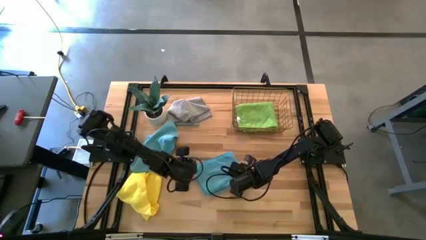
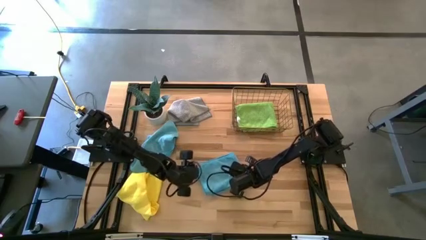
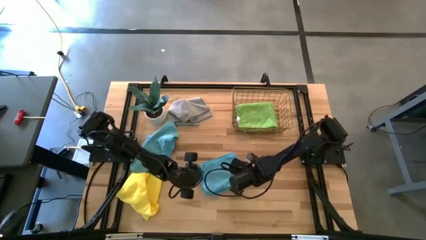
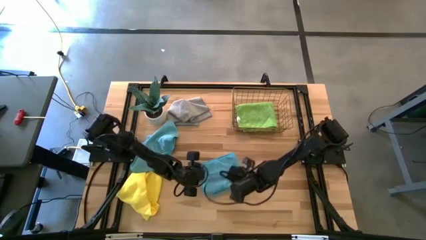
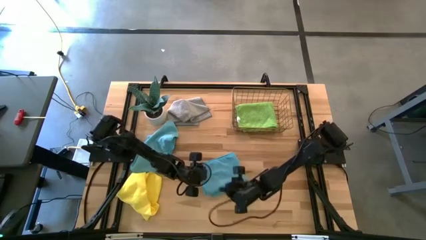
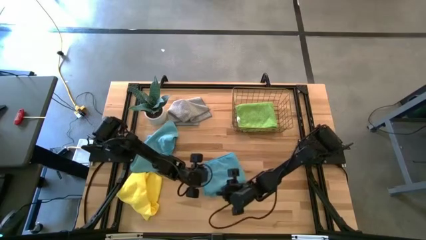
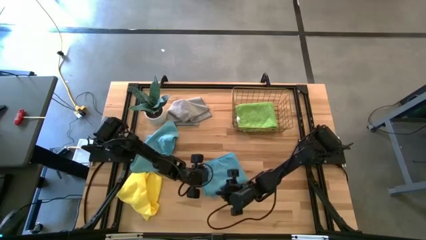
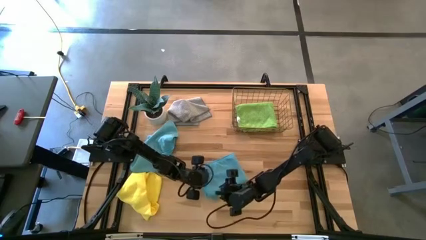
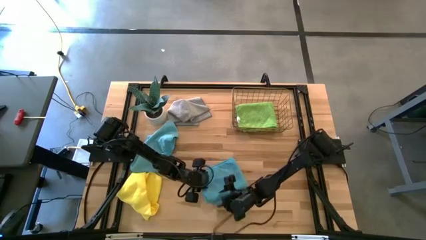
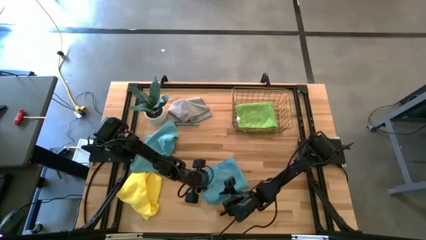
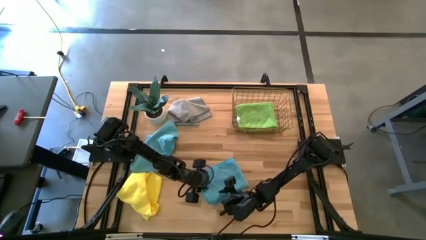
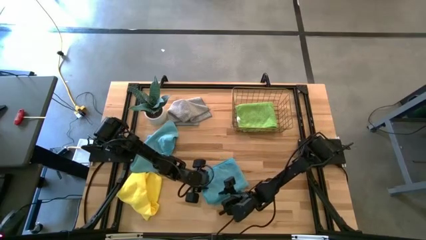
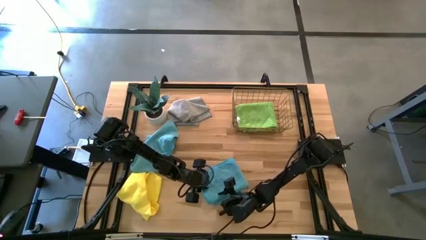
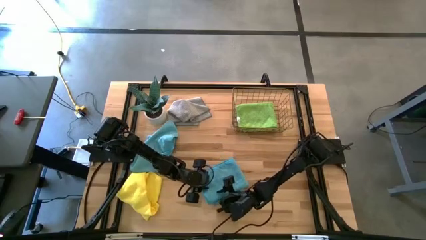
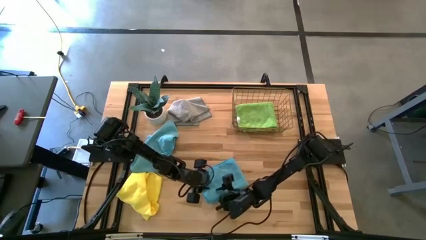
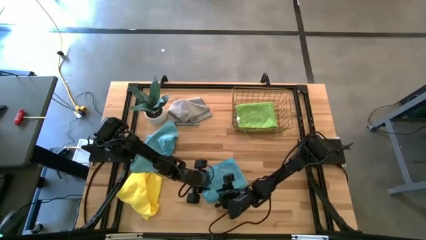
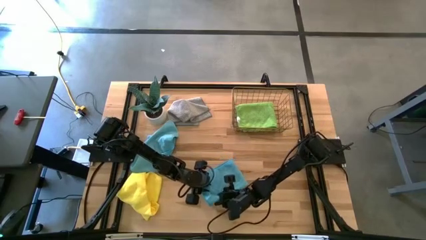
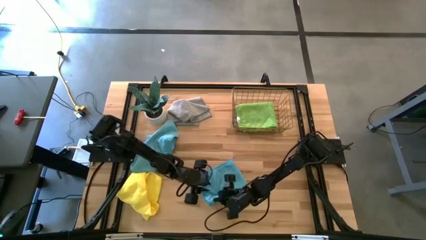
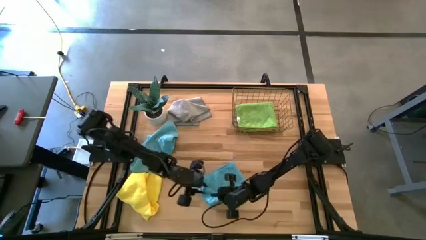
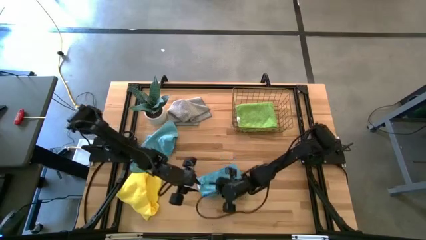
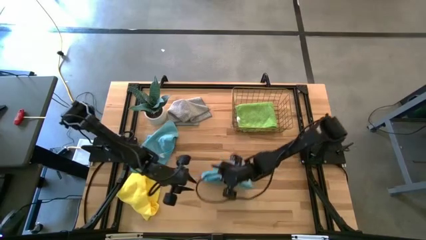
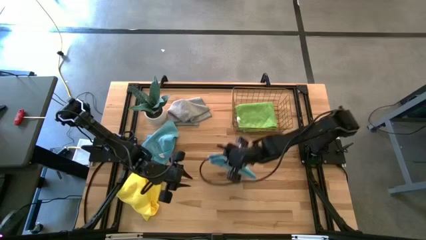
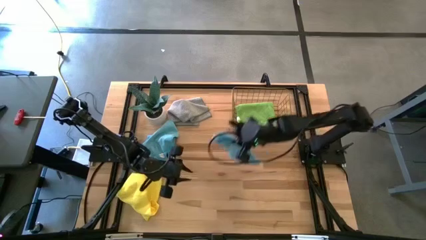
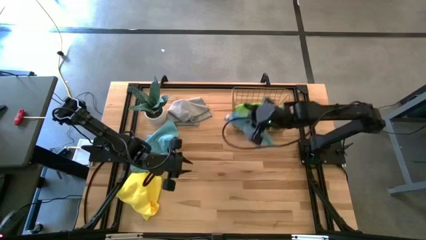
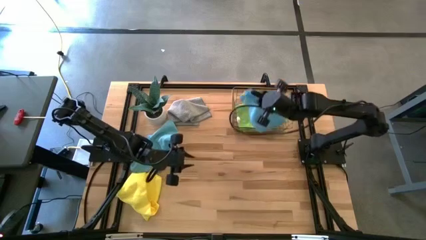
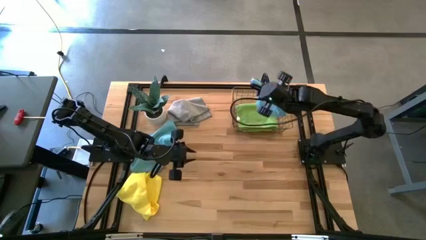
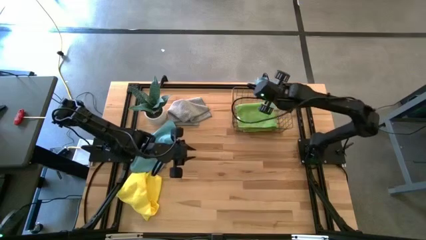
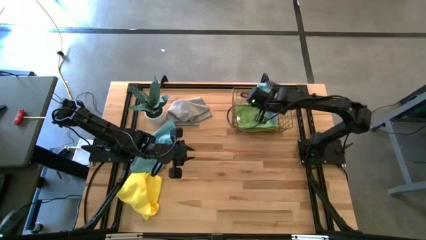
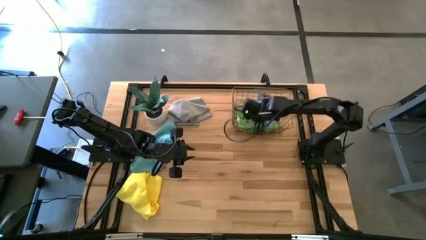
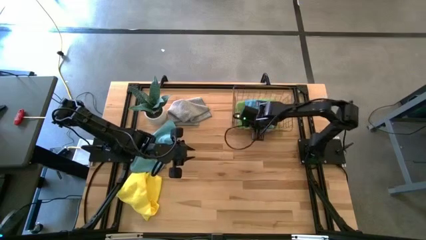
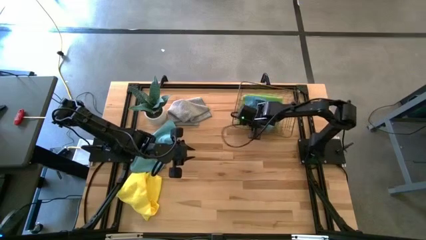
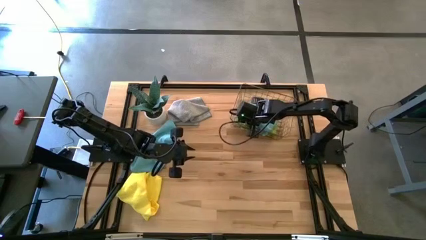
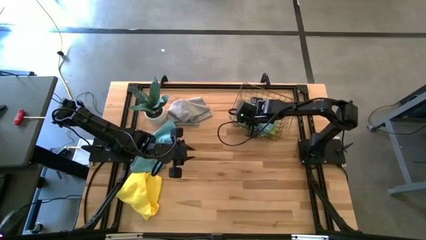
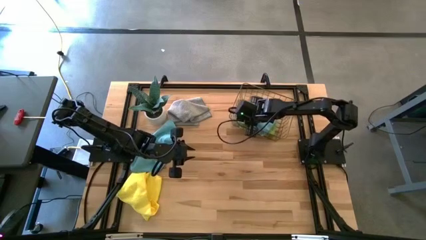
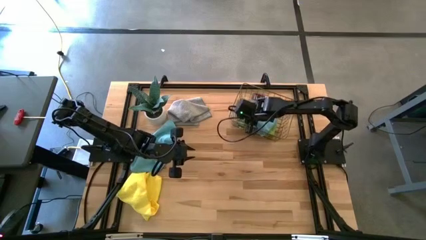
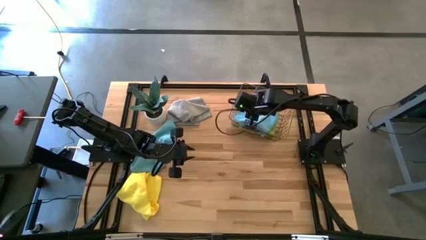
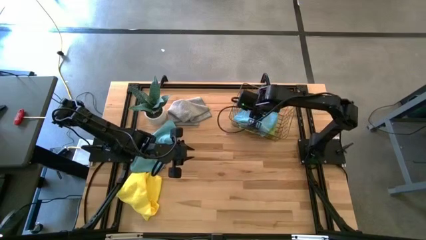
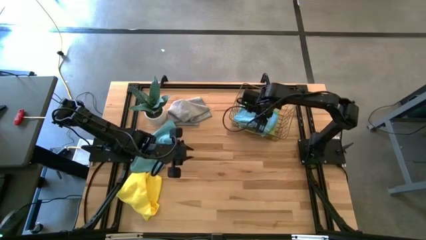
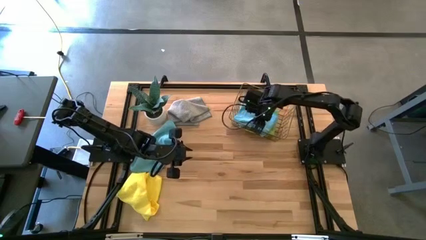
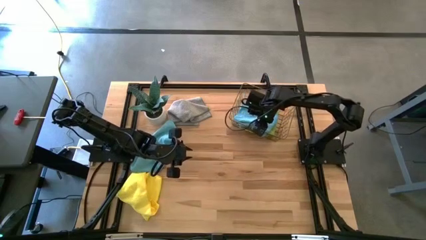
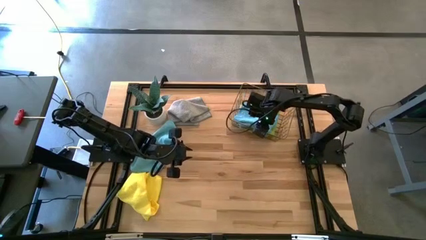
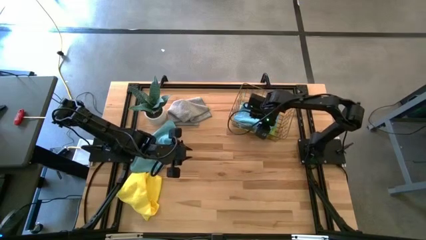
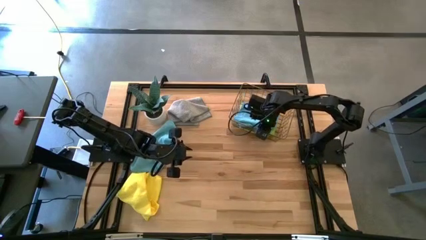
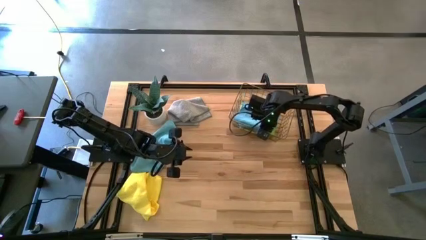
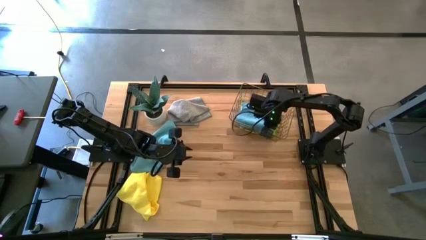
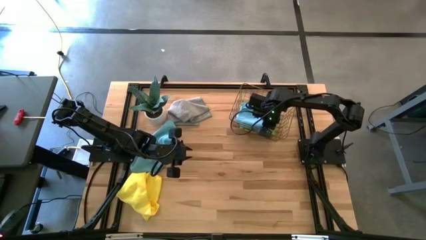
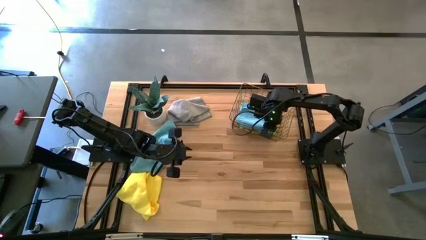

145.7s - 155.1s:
Task: Fold microfiber towels
Put the folded blue microfiber towel into the wire basket
